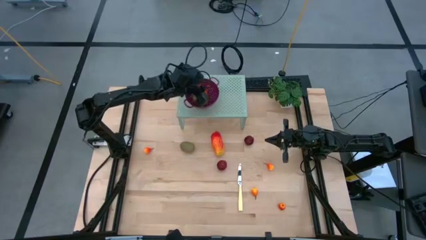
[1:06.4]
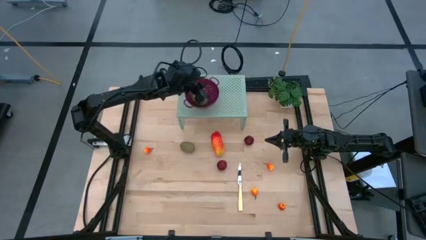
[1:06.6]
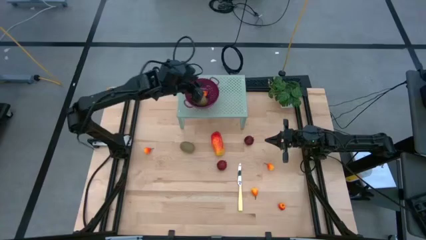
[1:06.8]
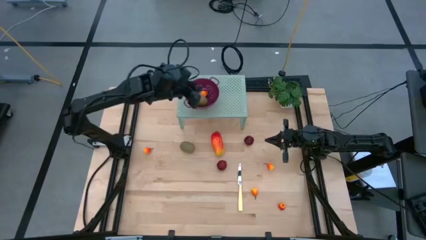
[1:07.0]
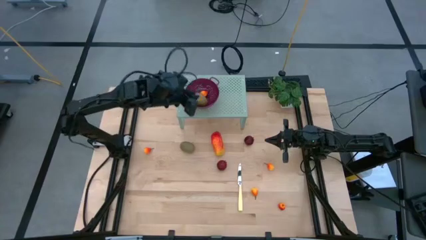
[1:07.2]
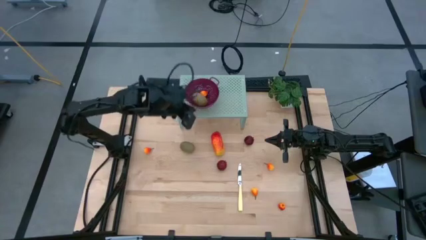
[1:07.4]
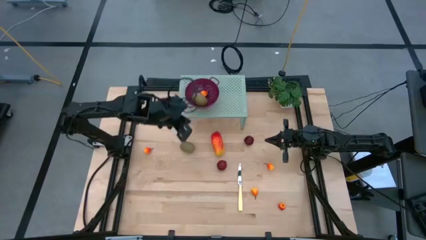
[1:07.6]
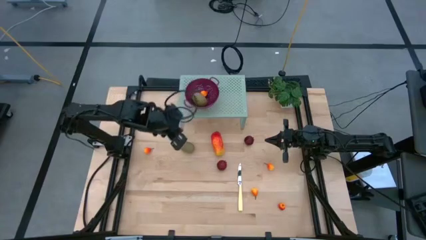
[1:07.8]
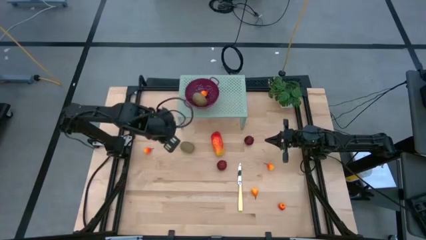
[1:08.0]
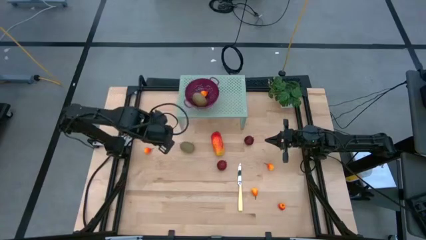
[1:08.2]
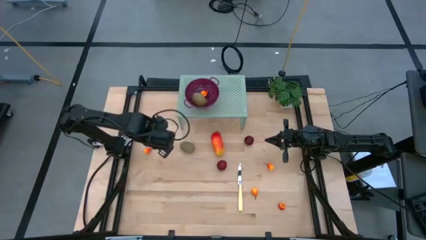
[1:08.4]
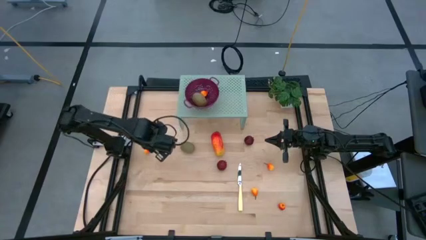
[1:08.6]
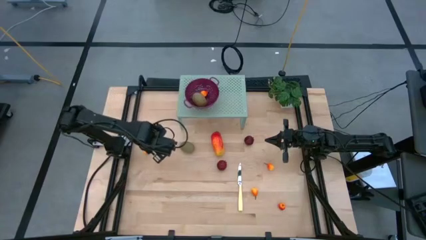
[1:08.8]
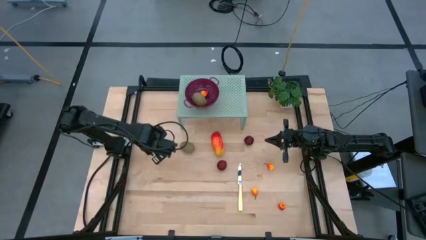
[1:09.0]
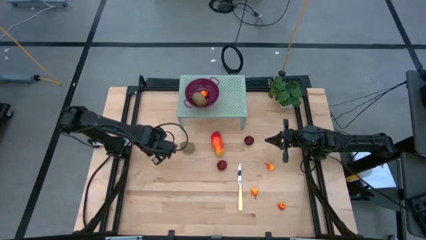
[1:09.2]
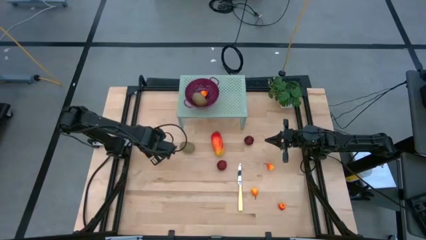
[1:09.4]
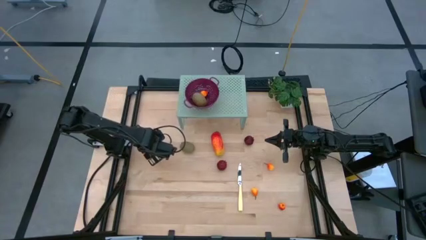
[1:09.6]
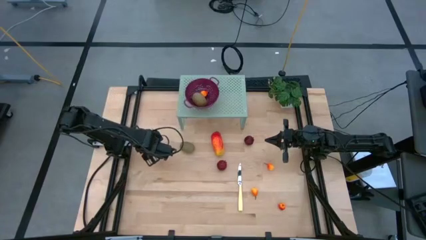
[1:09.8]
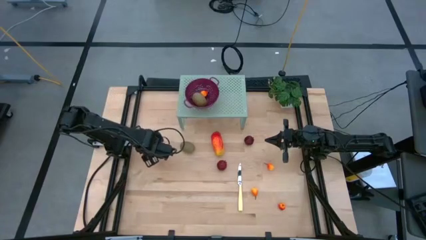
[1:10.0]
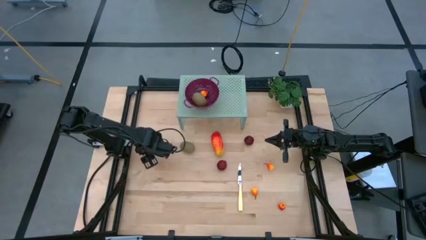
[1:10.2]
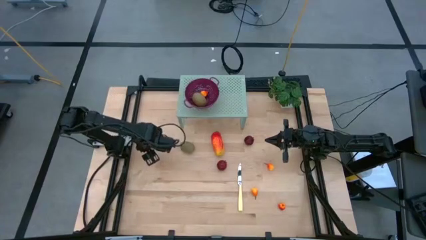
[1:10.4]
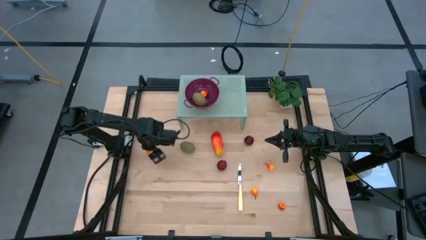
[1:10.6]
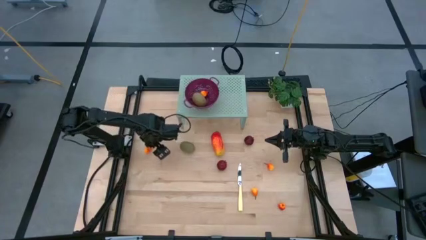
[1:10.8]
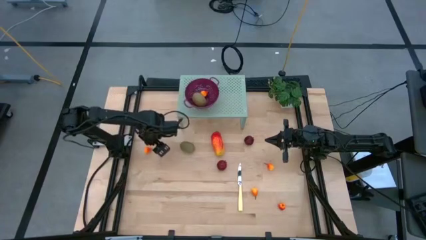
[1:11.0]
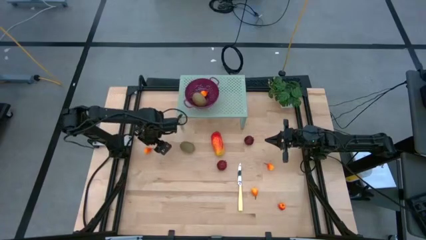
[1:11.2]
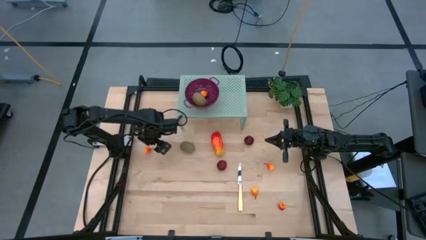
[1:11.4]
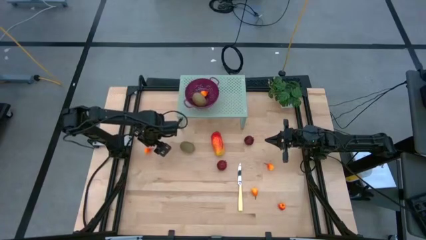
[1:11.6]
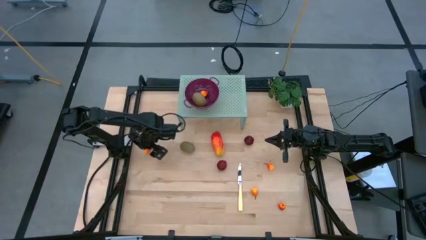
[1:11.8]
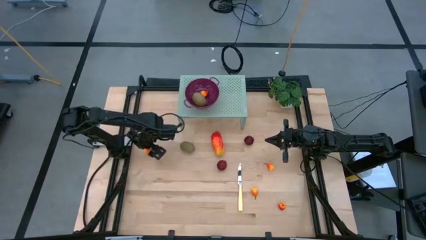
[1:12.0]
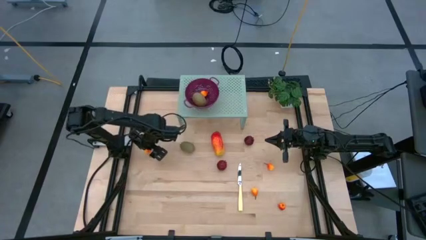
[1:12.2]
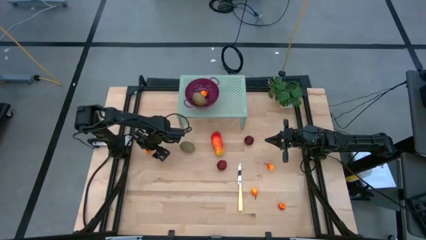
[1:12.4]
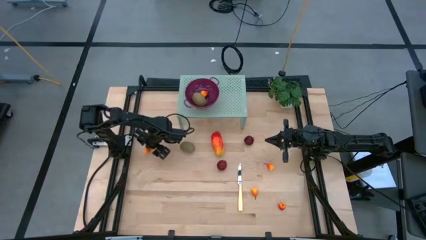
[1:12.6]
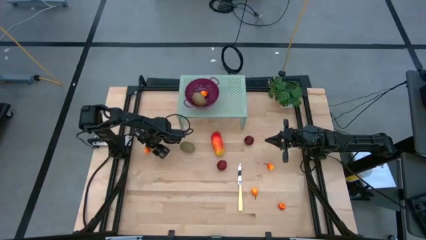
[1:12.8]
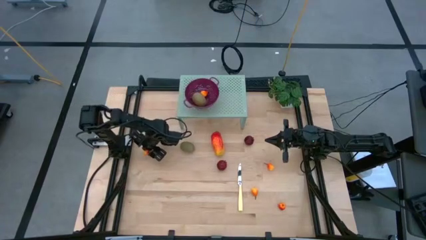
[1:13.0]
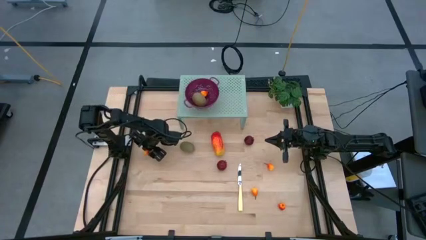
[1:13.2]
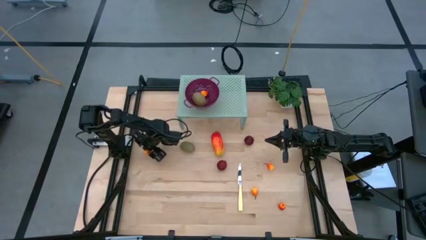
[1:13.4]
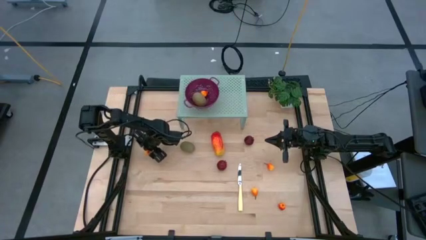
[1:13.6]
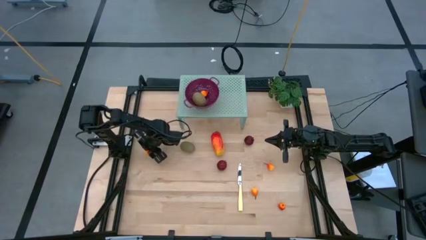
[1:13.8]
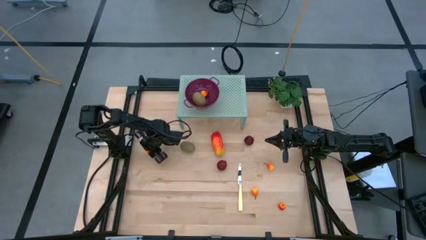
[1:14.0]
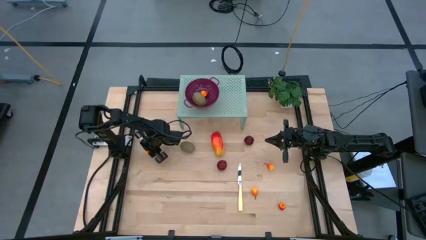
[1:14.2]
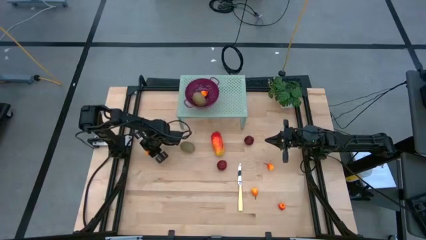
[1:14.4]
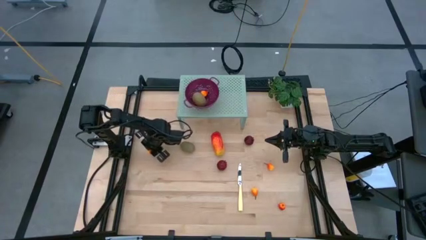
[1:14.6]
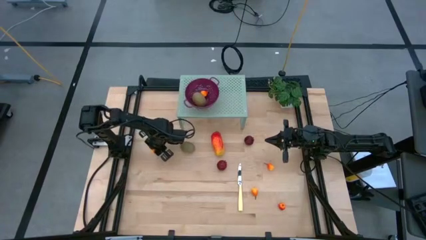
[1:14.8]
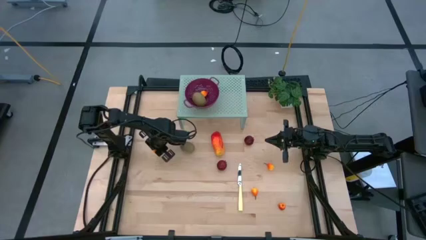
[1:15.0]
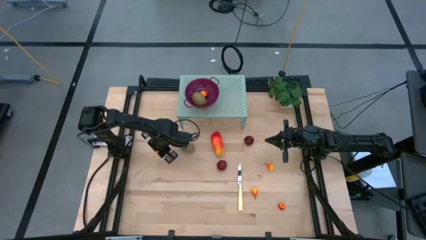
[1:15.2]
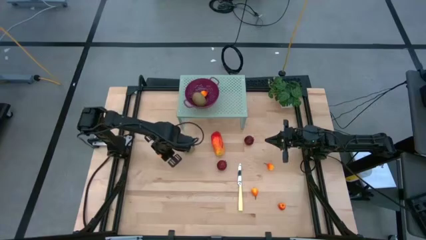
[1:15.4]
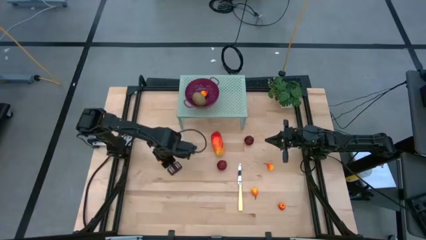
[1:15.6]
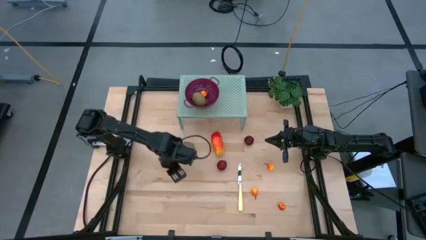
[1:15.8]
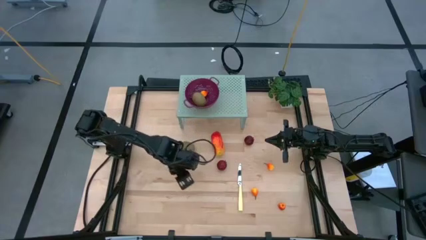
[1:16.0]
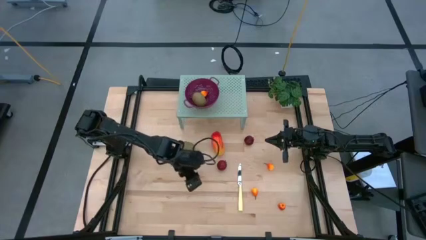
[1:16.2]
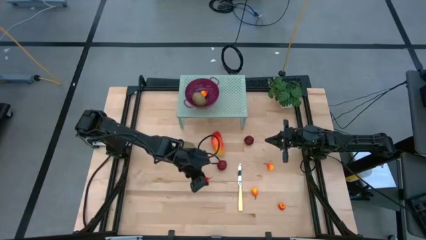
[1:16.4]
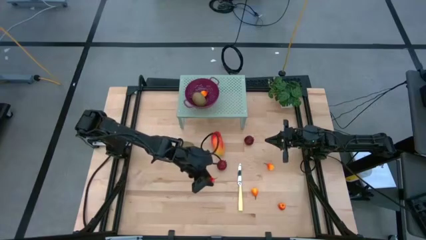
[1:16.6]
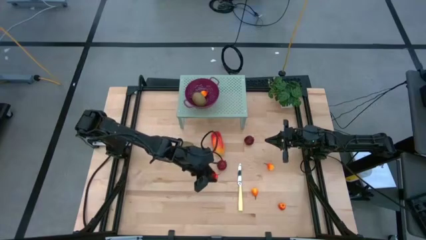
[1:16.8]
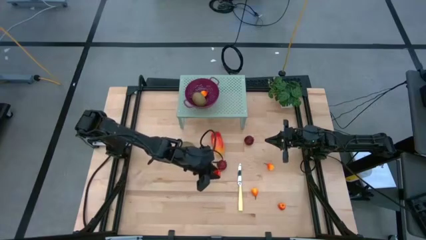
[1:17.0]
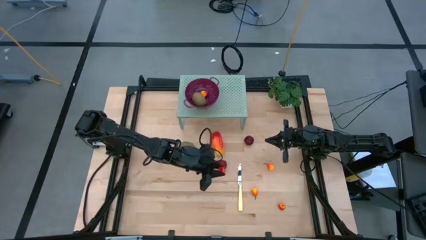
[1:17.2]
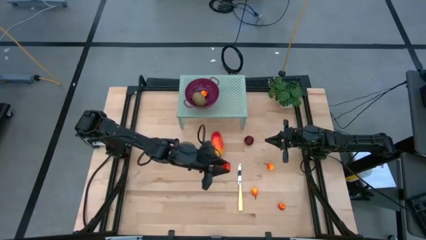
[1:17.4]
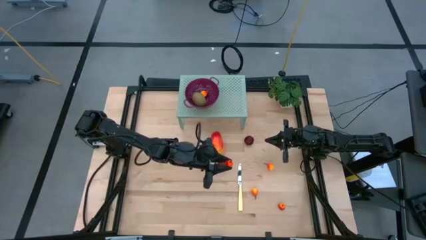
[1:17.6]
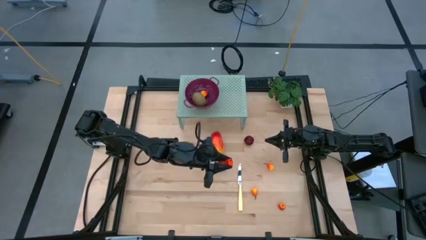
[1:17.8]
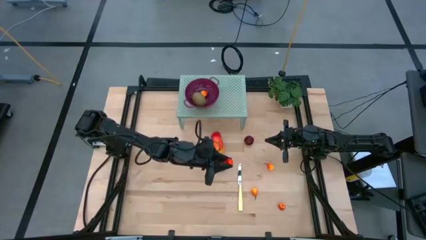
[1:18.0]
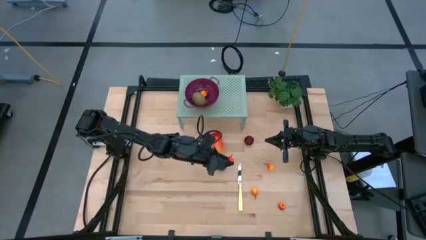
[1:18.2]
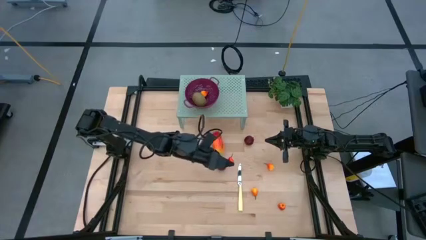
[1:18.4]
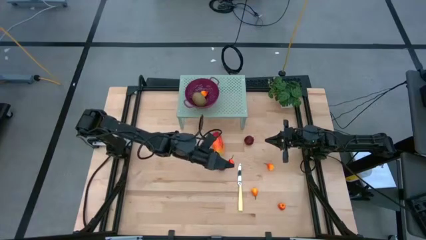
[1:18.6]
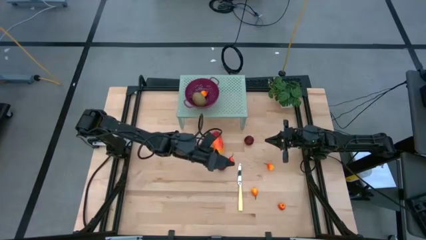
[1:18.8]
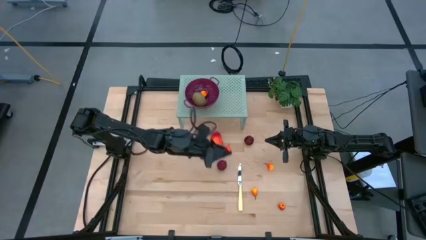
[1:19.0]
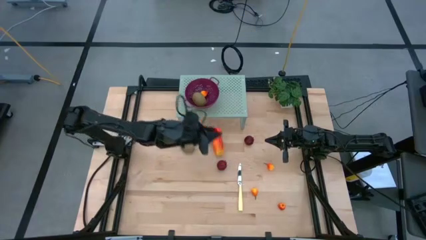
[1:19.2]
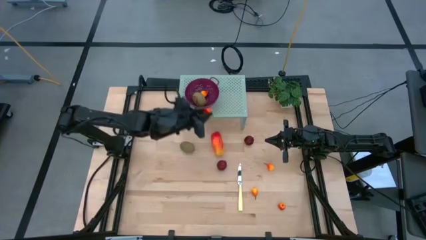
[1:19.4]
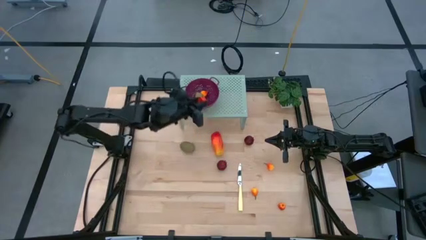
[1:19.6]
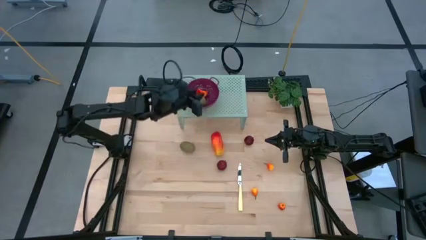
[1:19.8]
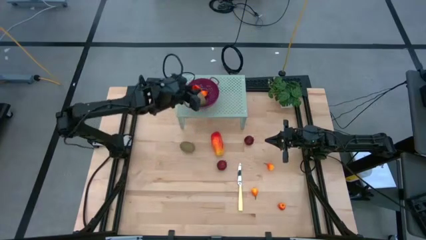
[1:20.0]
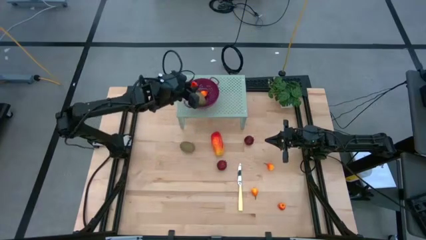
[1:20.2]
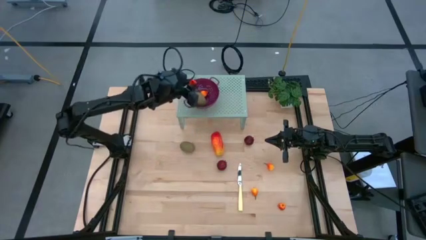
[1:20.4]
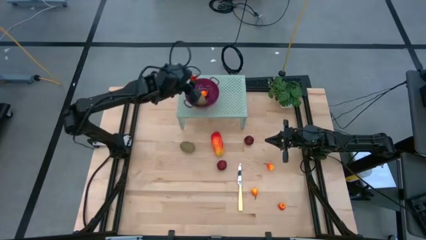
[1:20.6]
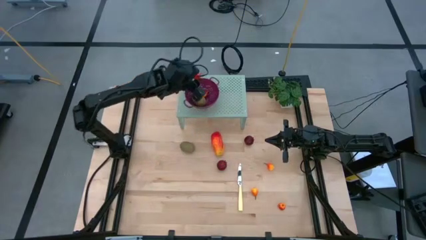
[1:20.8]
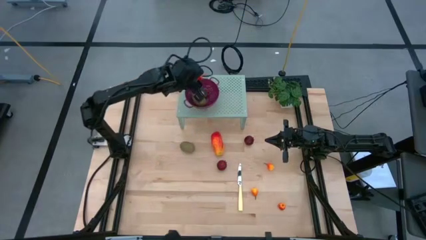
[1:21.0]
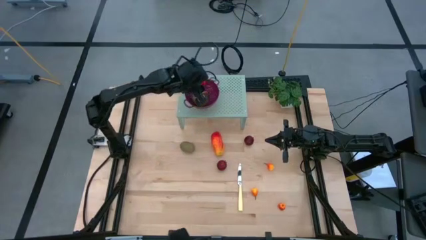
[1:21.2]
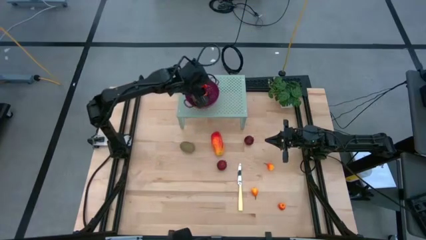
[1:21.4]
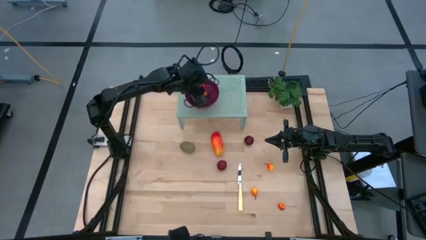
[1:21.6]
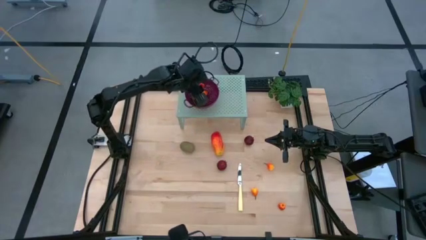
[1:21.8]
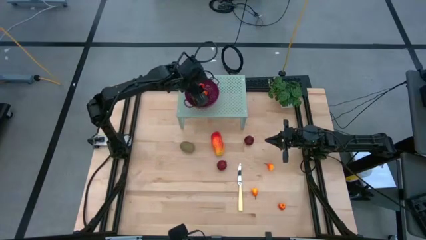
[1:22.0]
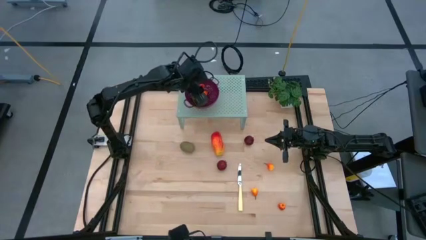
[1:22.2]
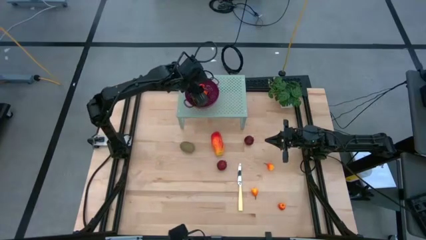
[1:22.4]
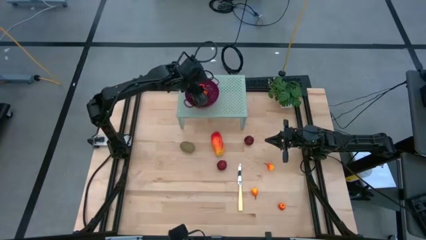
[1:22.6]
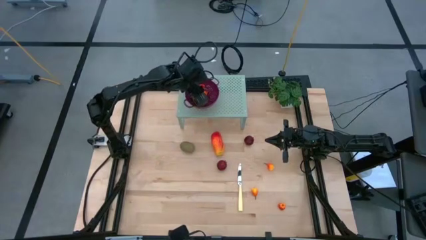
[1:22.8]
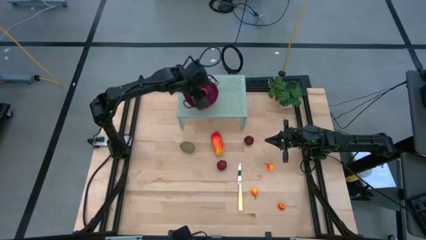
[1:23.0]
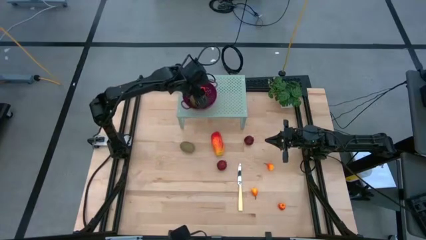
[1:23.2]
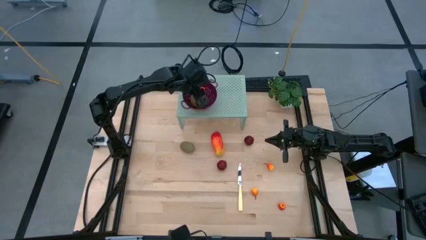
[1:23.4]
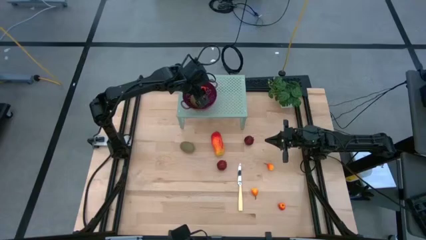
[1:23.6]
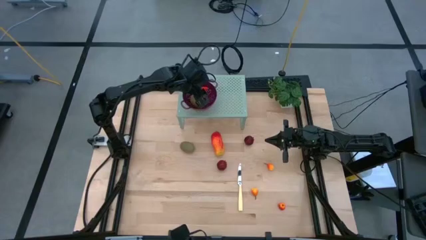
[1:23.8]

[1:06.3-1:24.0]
Task: Pick & Place Fruit
Put the pear into violet strainer bowl on the shelf
